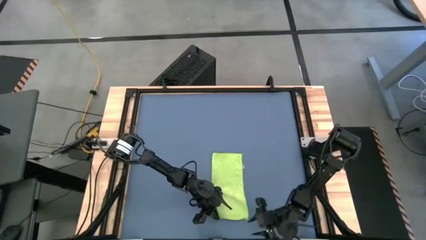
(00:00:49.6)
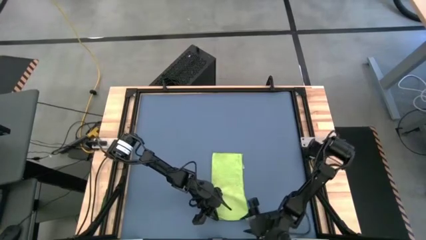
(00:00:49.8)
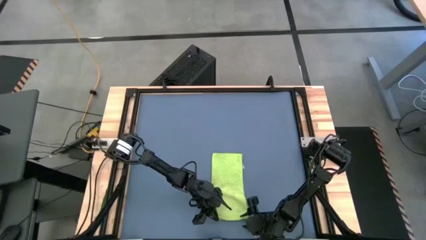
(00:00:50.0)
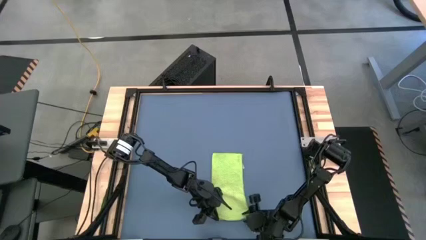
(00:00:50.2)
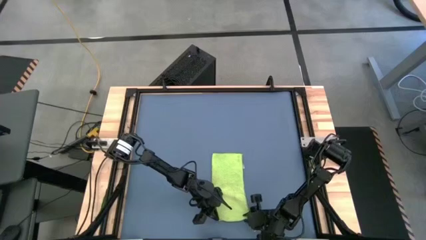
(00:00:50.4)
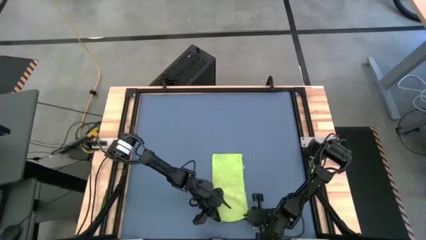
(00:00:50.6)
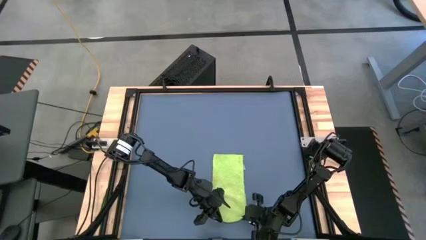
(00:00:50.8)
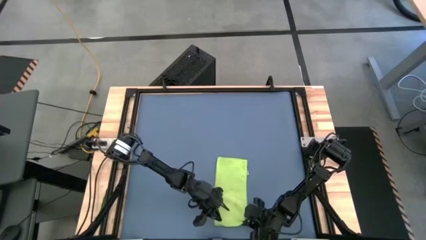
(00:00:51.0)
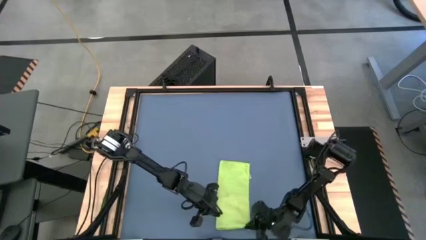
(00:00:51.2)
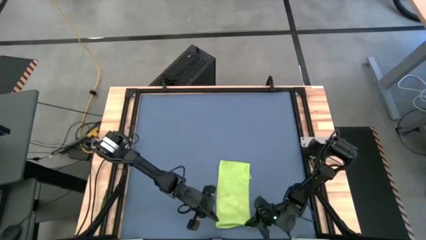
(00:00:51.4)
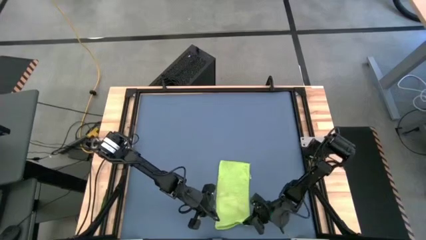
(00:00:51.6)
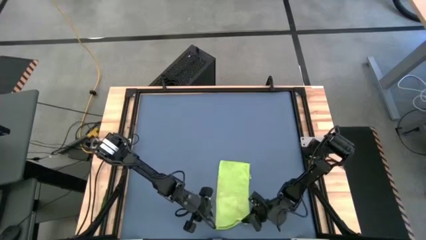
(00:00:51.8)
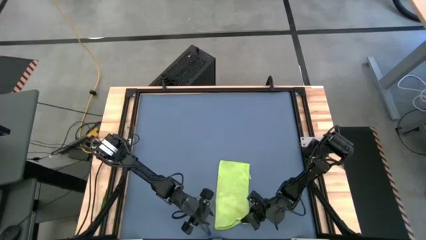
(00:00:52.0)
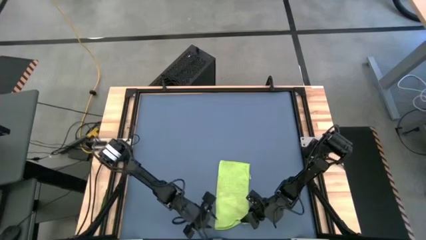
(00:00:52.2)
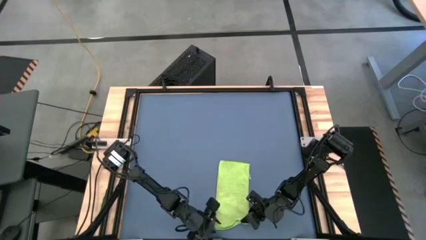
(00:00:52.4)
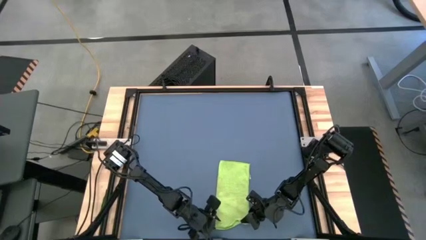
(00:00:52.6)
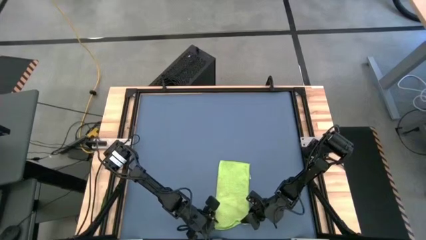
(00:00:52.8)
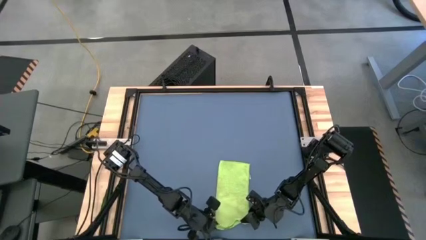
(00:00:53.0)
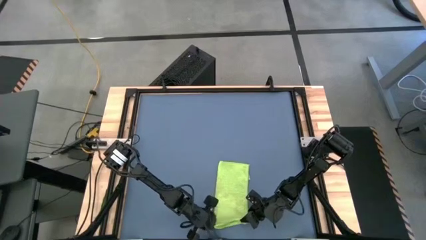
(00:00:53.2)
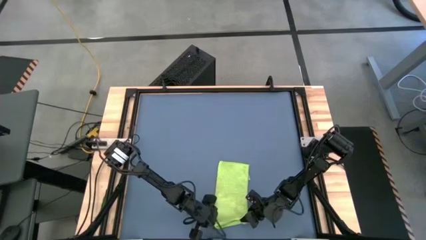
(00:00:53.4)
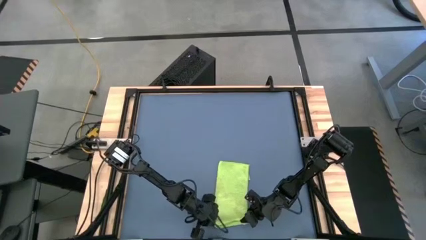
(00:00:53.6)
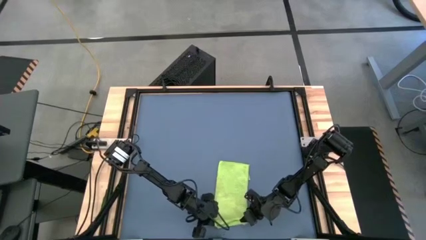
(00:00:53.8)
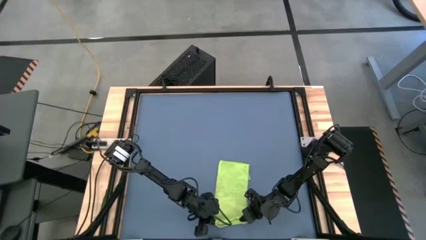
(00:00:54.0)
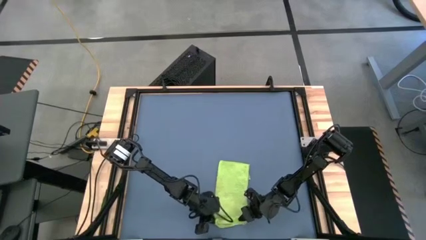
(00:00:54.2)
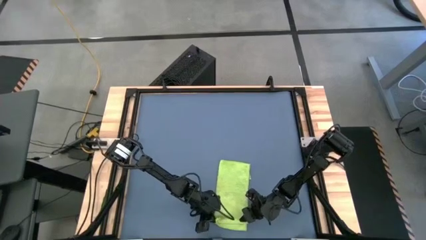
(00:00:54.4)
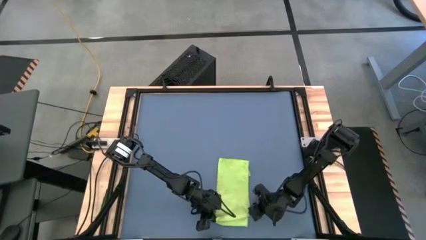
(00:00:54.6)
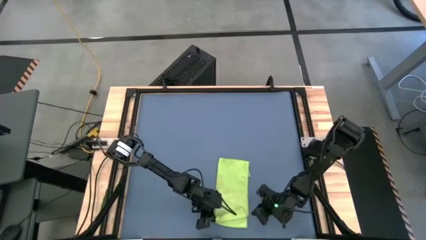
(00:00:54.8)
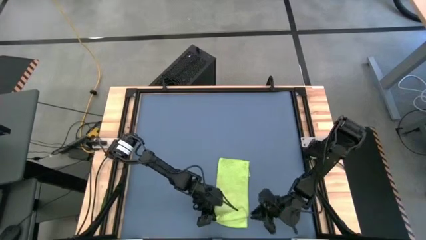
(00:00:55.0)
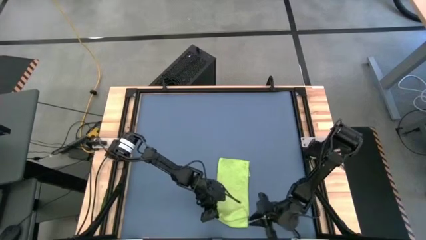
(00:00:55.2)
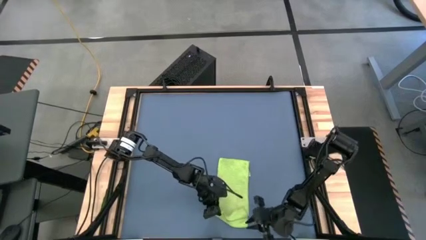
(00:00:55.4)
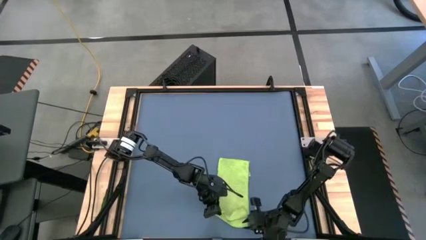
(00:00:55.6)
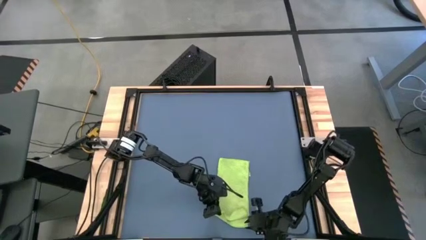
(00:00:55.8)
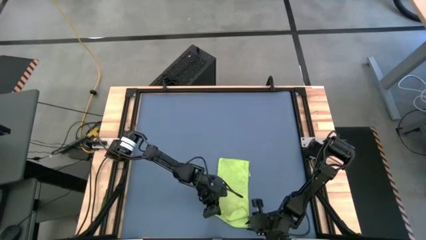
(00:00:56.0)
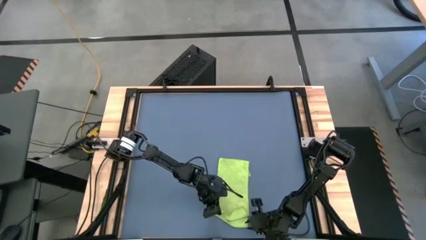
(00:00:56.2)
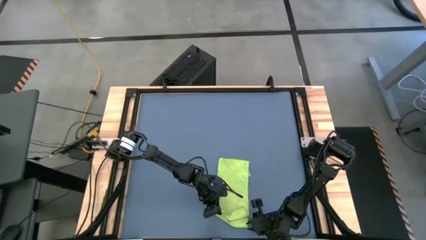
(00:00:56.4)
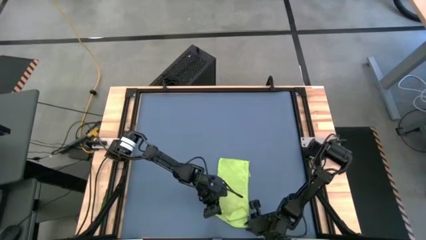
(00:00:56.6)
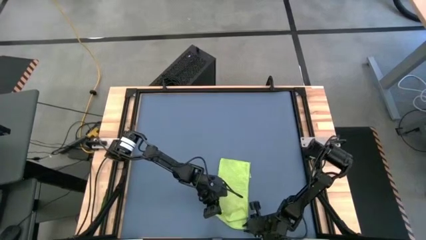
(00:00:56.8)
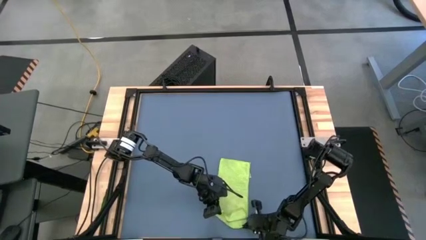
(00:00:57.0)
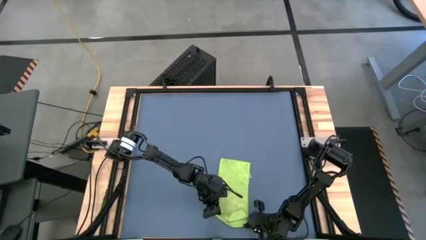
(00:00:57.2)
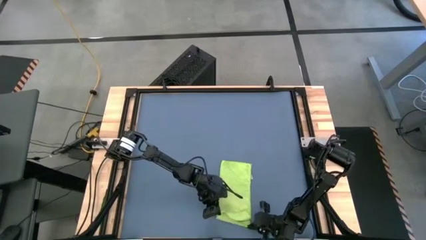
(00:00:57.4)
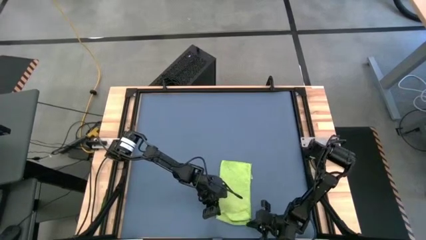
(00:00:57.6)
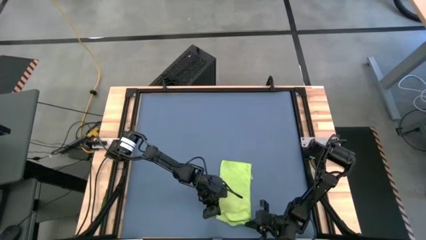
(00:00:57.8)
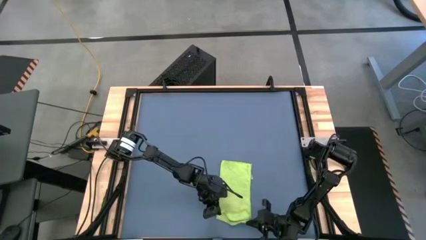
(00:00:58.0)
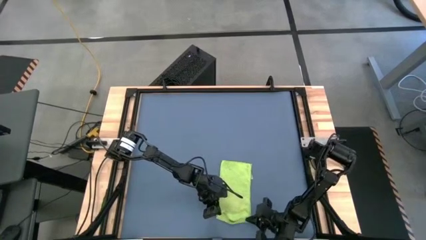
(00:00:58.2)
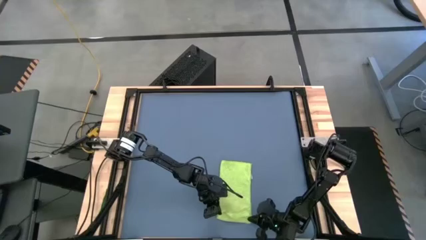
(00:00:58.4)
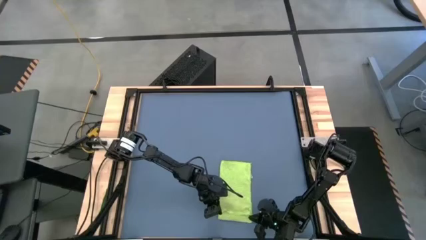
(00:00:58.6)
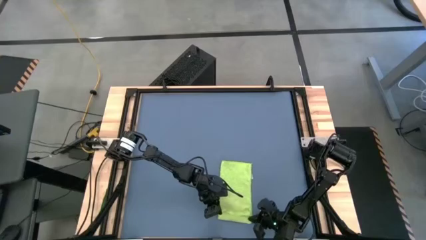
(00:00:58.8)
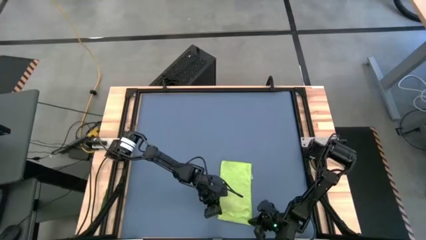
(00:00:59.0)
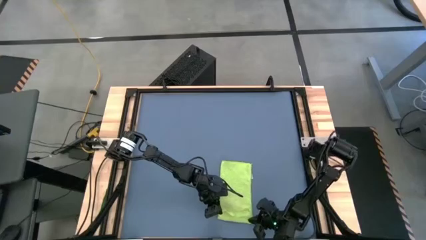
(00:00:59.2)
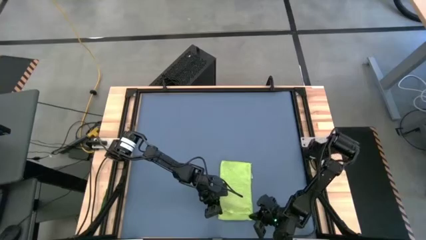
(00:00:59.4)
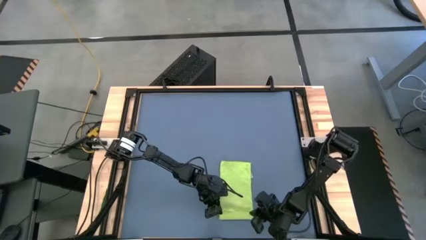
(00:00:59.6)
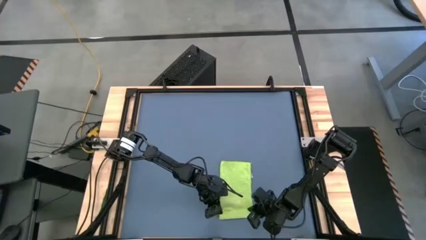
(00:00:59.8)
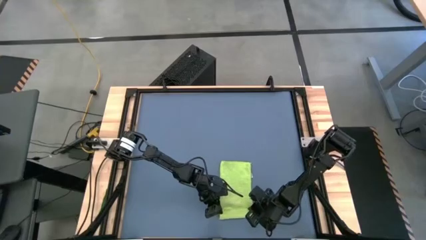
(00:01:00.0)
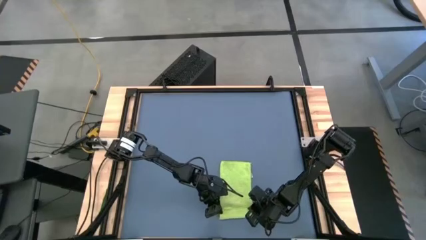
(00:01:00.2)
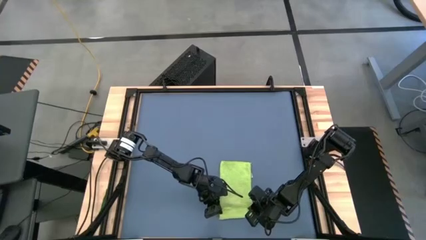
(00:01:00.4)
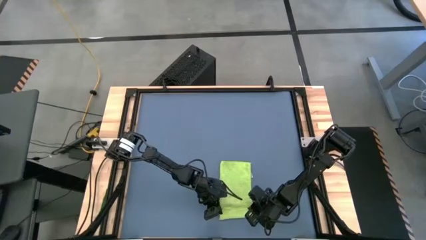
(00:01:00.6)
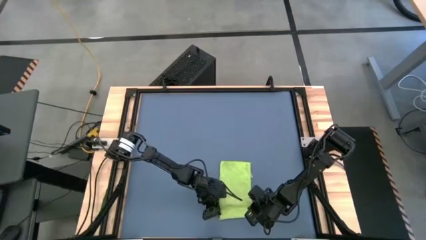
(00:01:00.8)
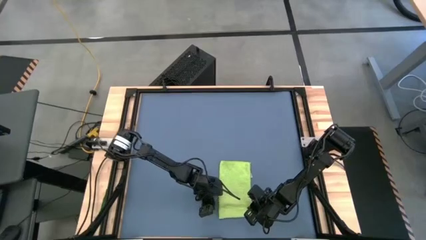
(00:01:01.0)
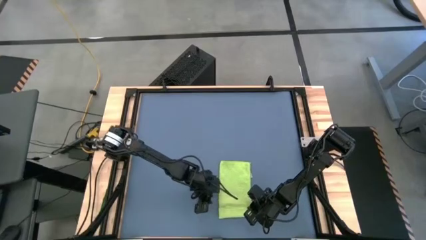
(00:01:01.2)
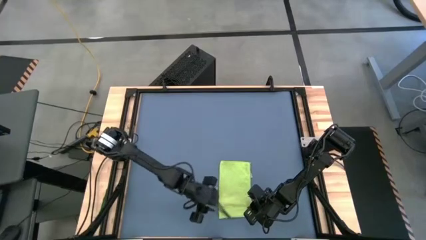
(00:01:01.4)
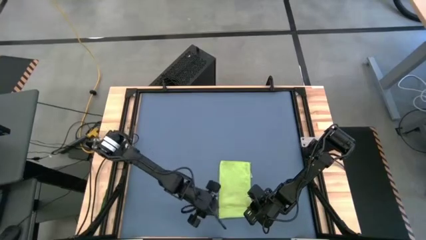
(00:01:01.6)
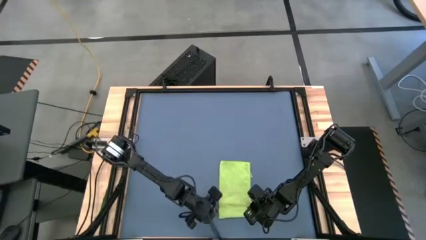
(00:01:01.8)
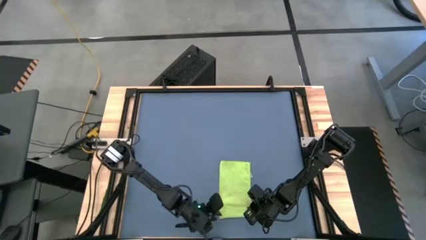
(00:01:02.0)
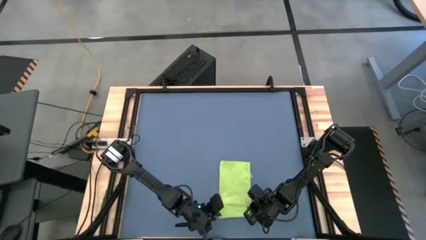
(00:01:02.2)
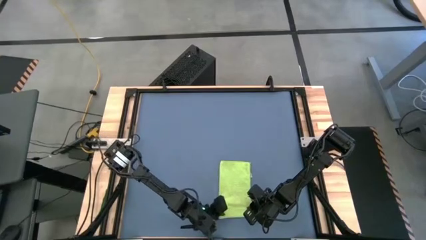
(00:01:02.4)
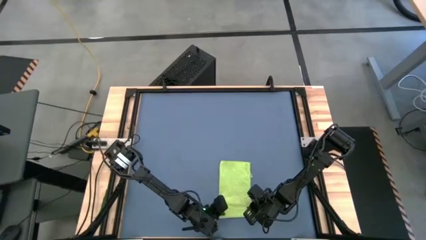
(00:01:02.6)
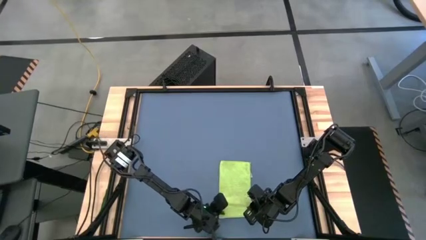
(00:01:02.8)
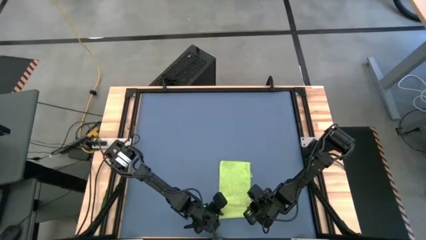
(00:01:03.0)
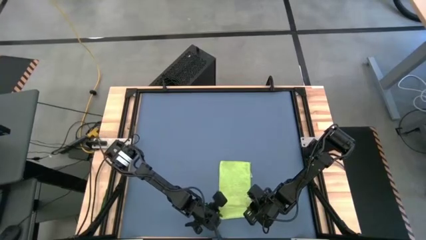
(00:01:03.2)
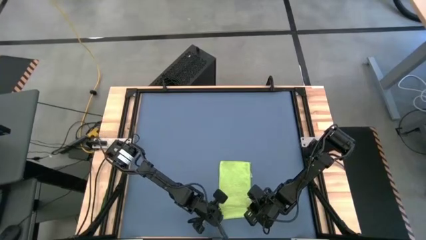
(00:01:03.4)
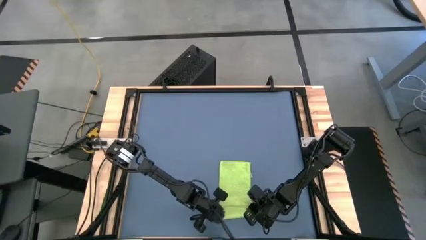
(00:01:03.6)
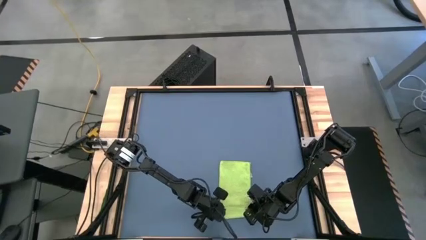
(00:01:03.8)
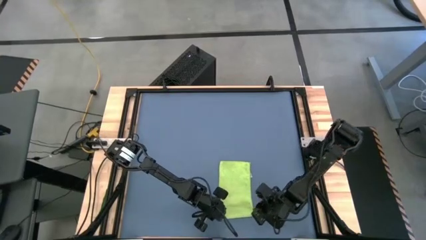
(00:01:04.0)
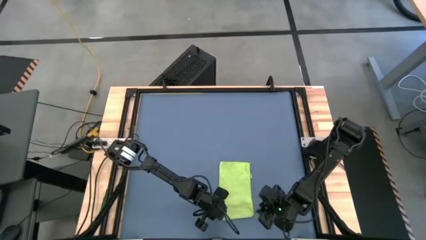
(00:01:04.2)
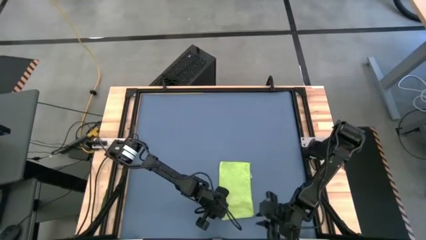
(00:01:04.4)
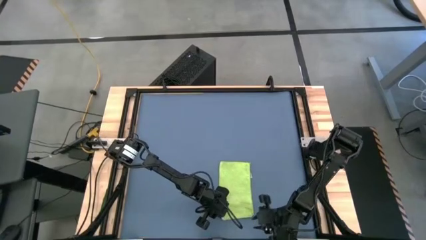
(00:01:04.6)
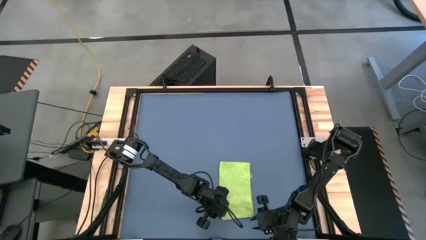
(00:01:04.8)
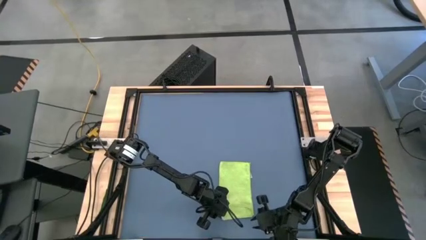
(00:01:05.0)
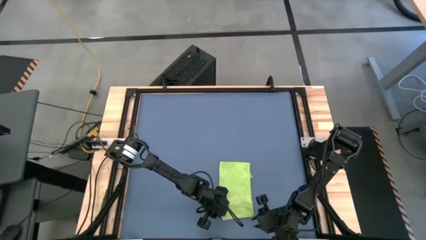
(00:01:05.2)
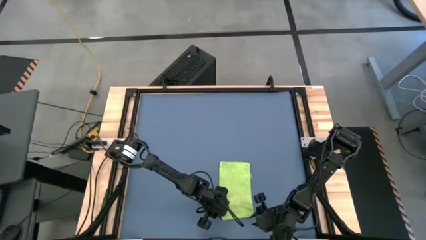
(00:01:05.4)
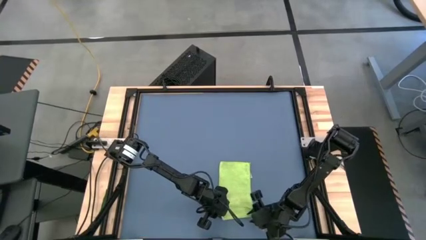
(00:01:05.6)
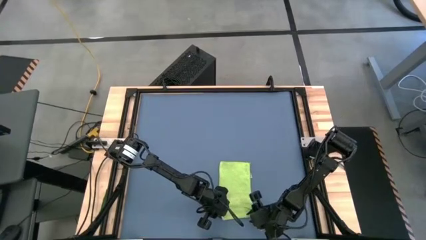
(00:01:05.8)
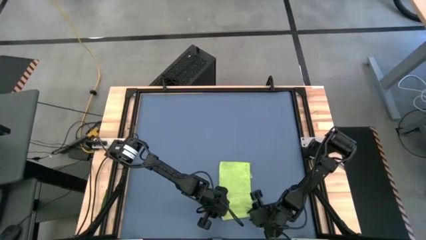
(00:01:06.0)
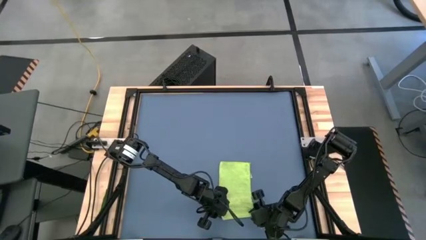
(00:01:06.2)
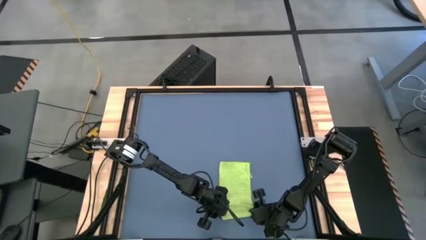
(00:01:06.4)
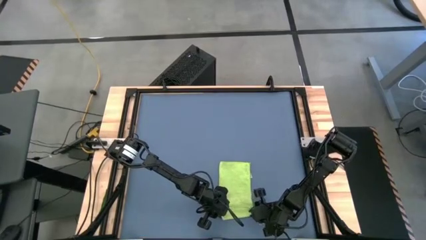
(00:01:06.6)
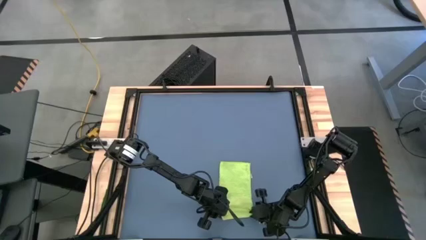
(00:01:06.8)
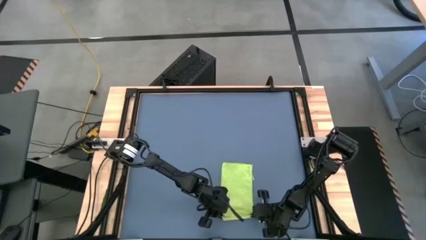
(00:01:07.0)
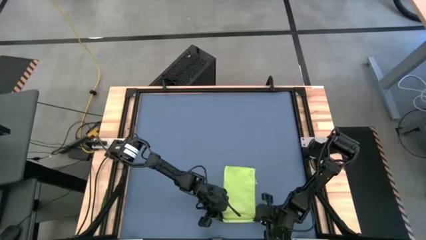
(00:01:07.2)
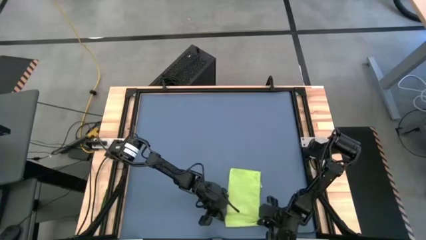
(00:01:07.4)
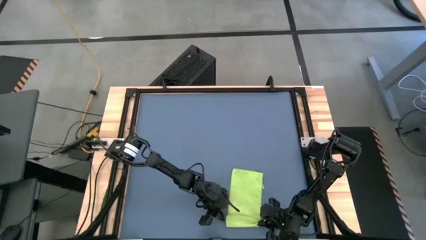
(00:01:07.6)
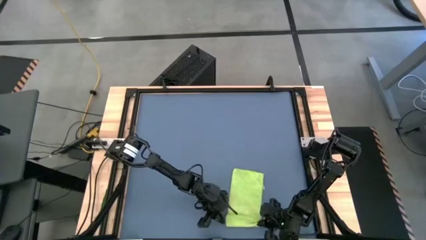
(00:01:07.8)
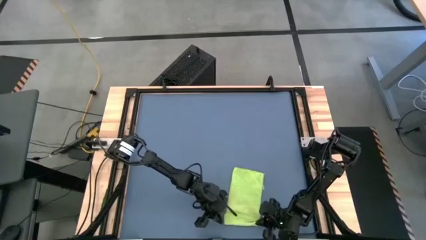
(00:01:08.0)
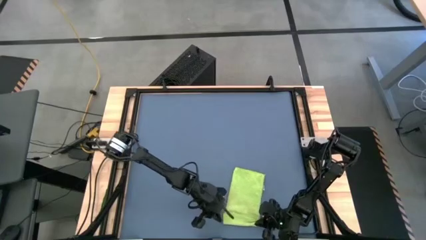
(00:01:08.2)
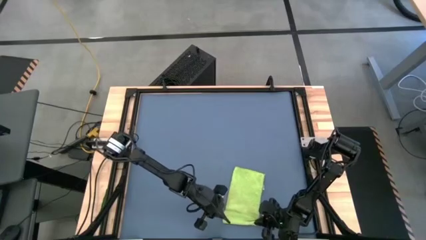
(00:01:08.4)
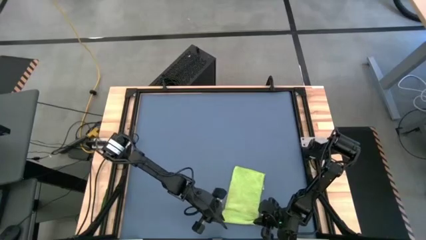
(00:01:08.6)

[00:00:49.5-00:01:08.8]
Task: Roll towel
Roll the green towel
